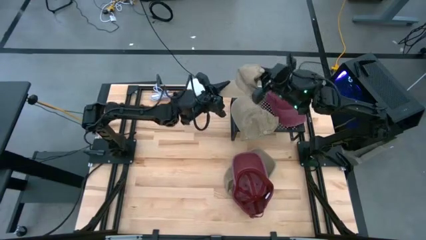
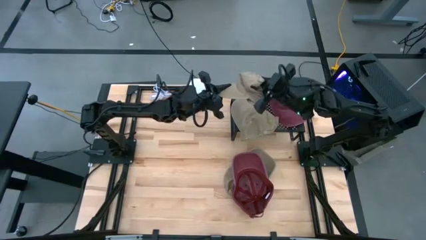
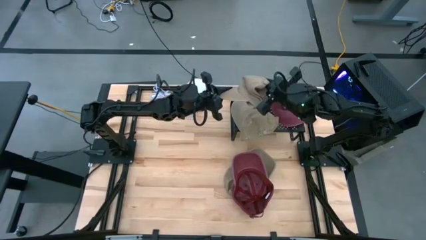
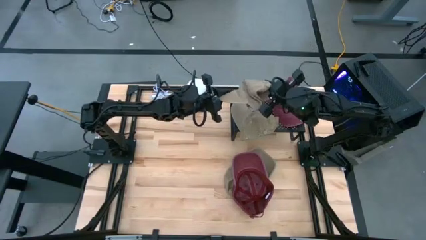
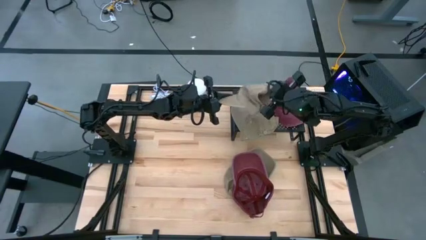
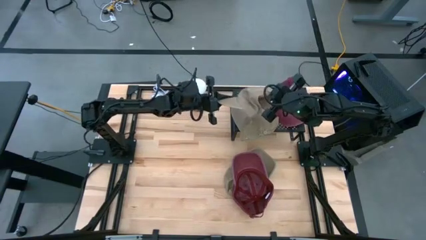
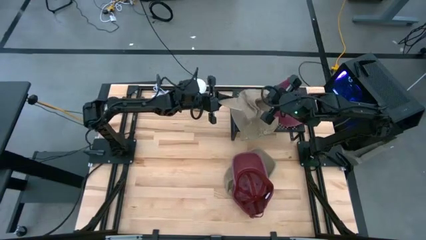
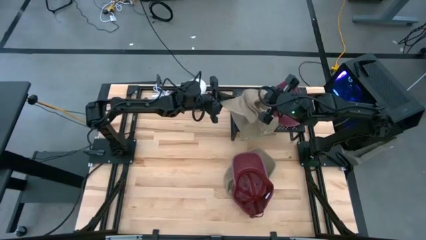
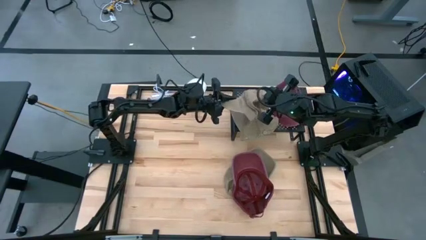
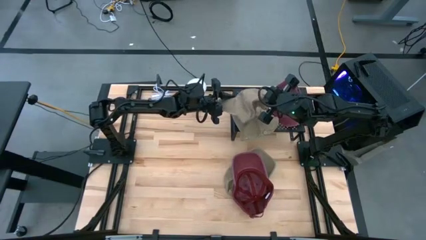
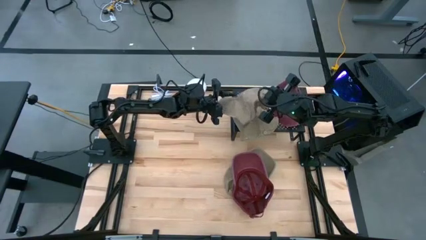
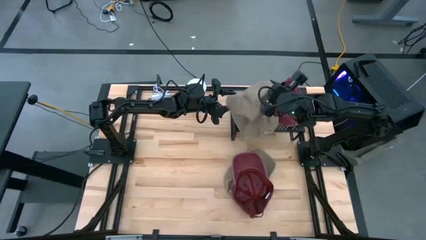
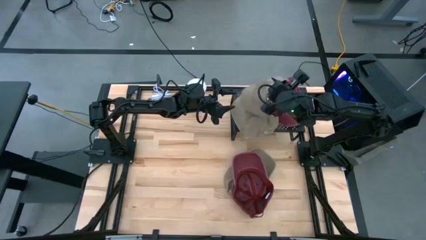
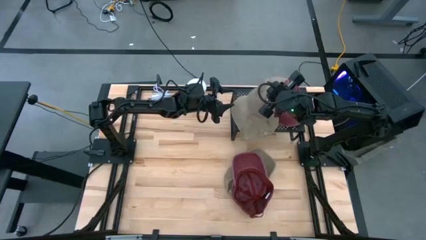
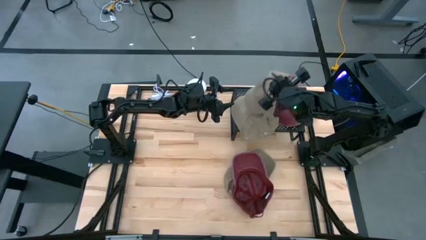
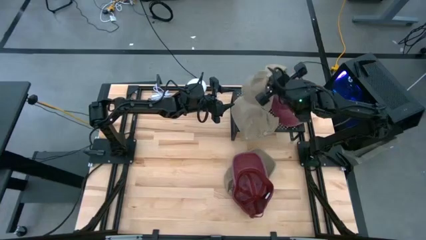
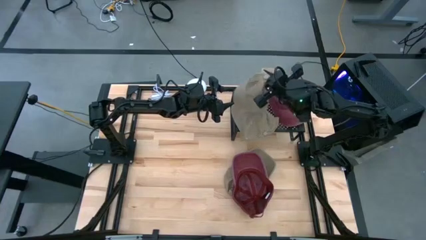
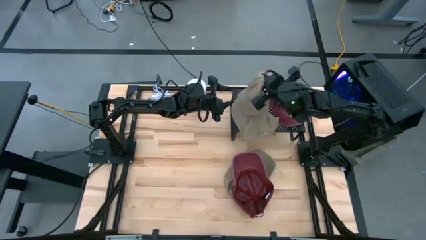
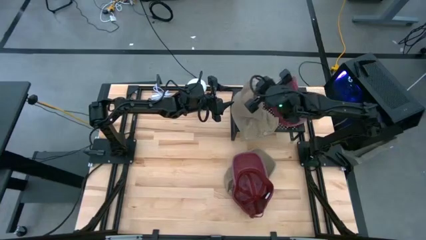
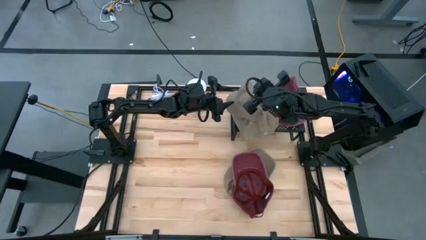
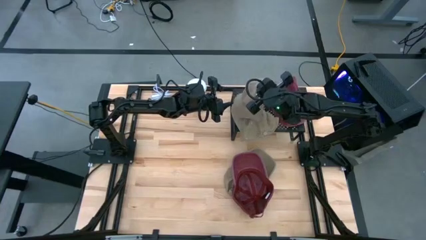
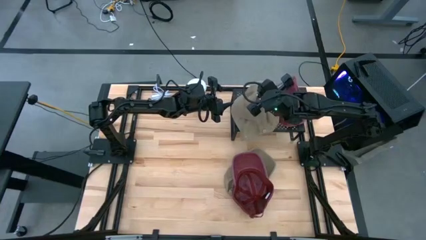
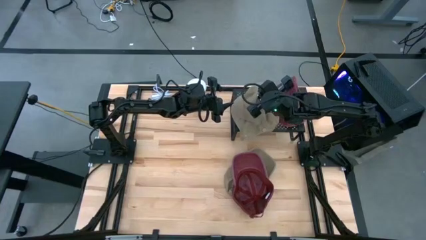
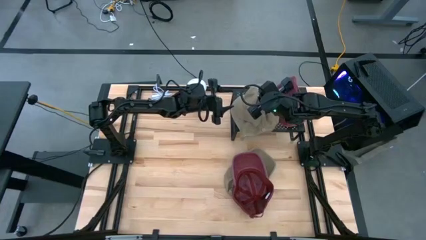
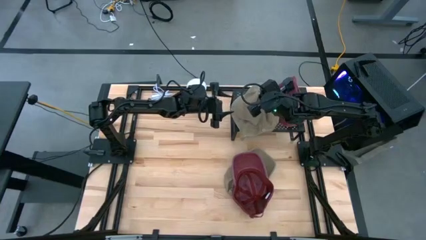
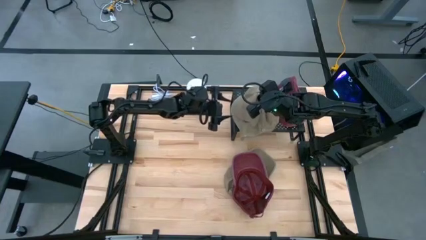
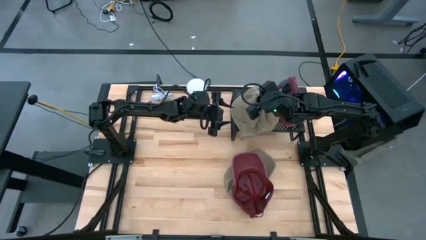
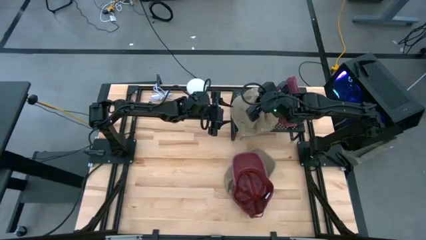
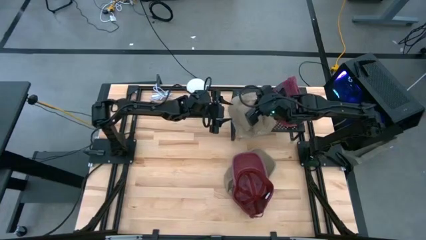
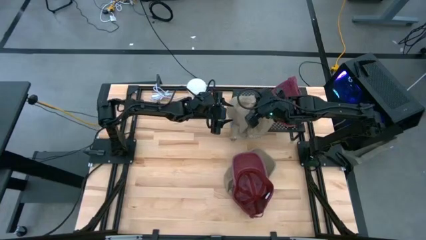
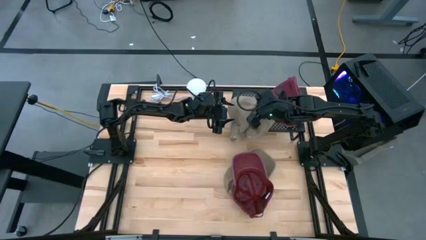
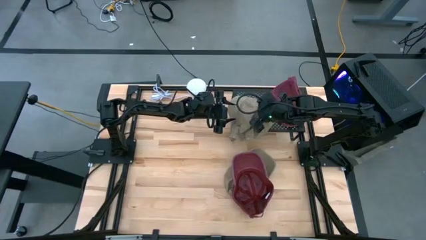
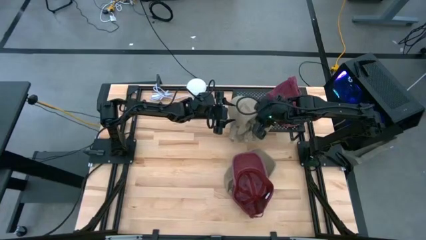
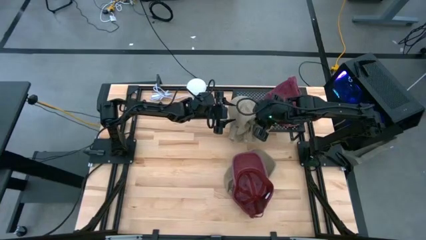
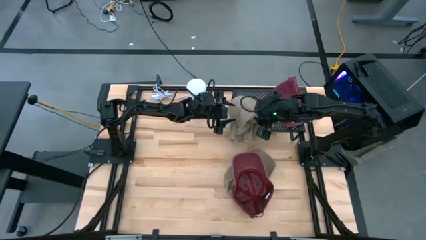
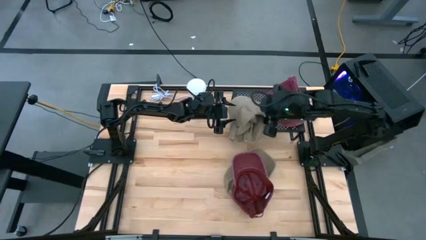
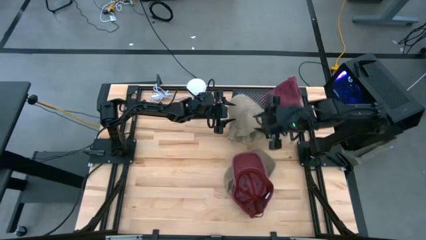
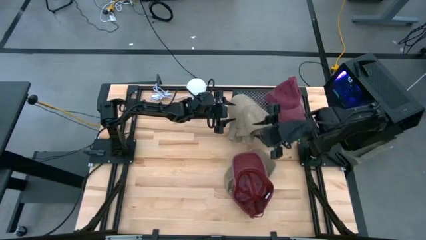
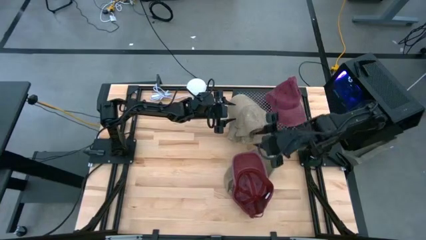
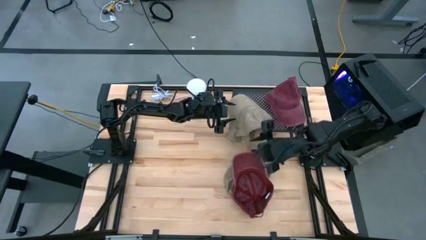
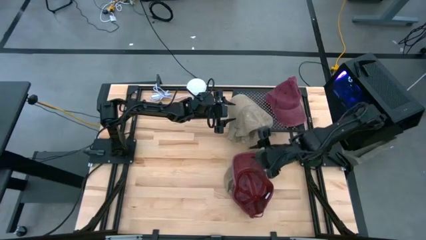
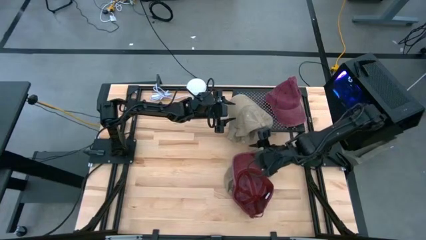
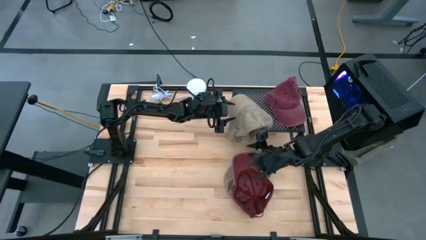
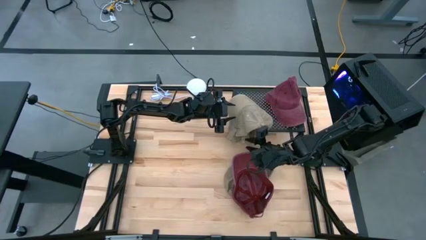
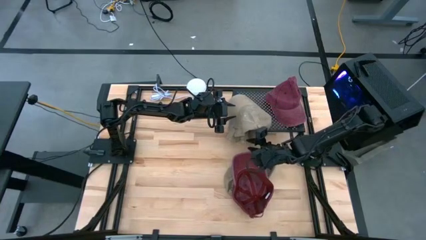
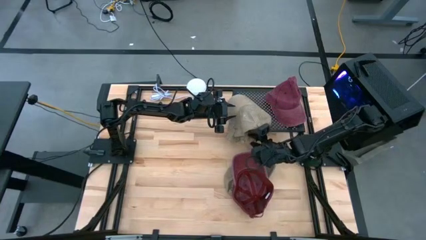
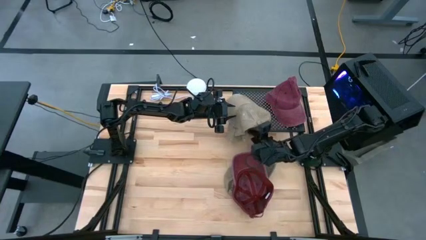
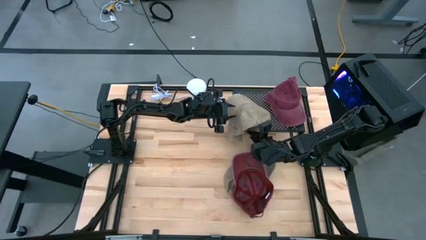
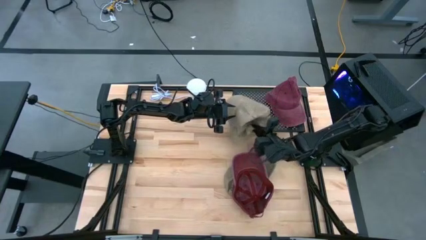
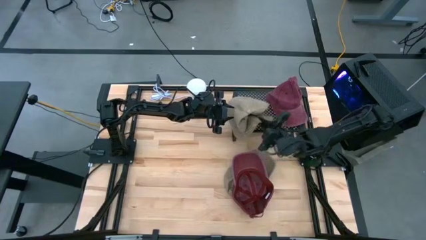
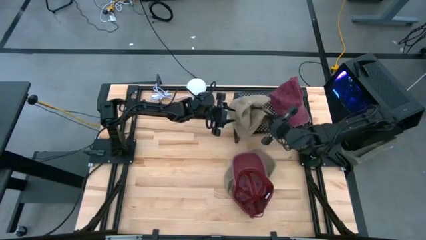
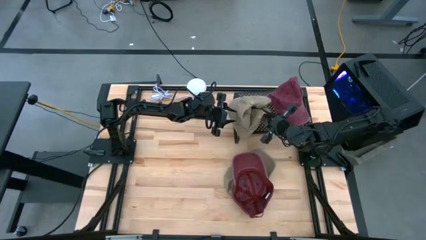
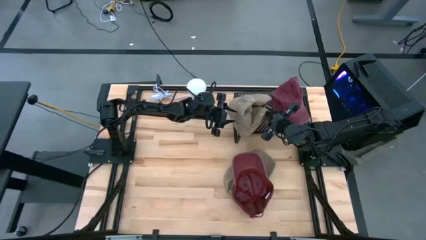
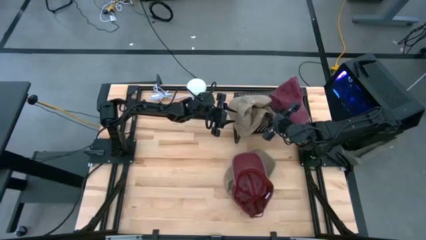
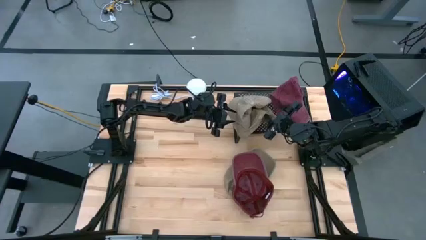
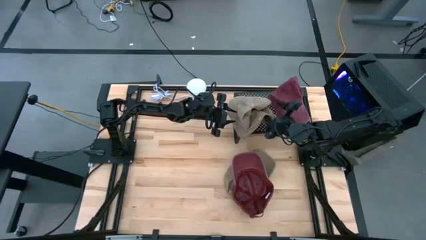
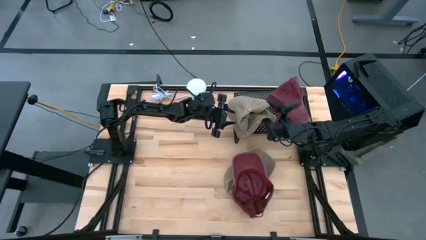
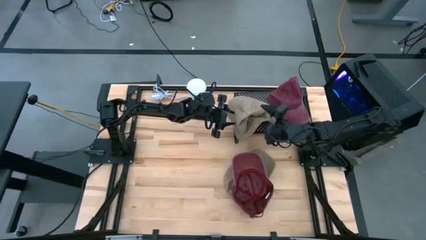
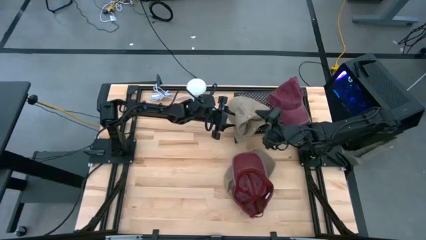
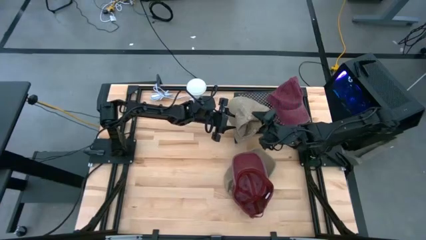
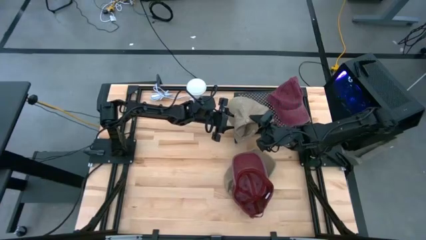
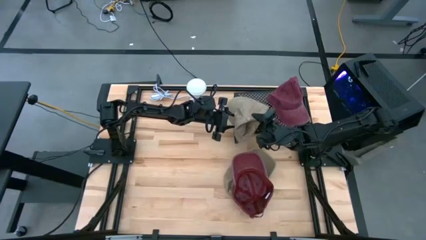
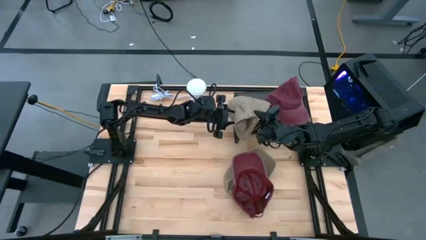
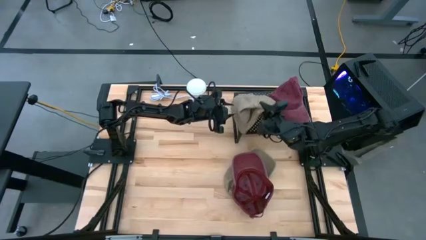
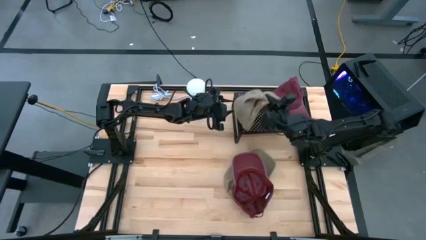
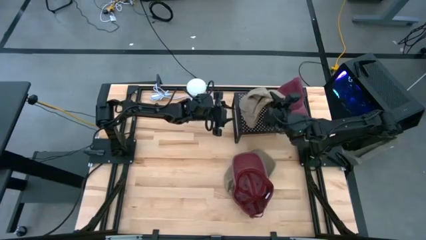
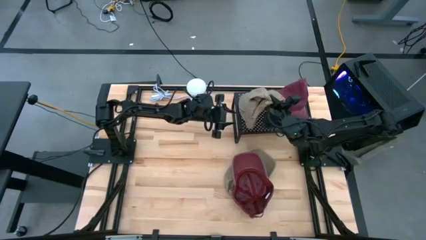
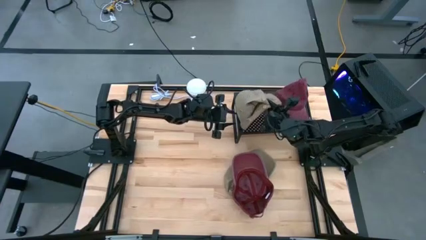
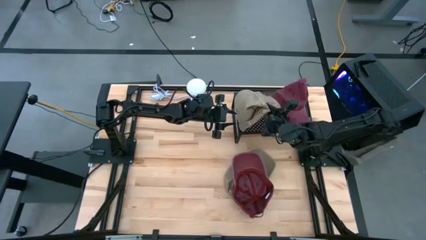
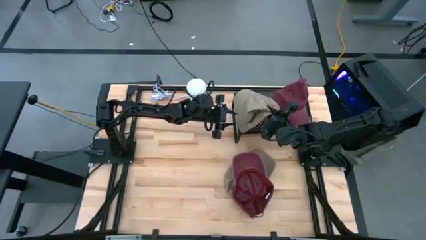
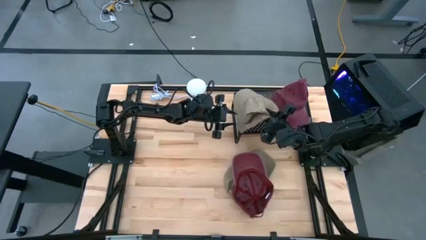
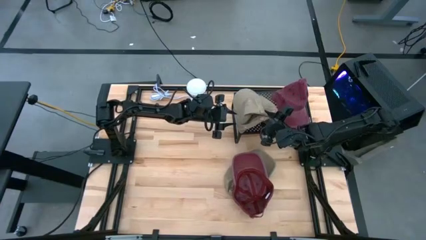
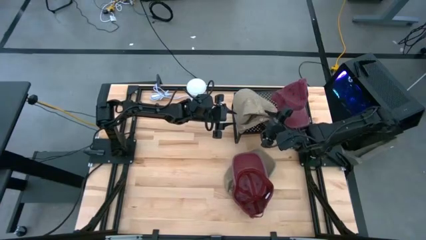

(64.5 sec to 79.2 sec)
Task: Pick & Place hat
Stack the left brown hat on the brown hat on the black shelf
